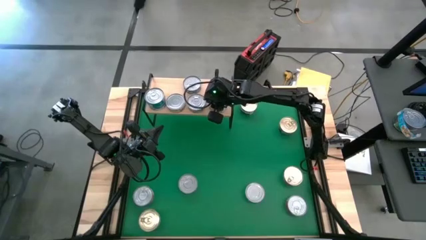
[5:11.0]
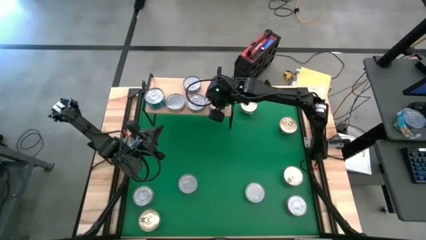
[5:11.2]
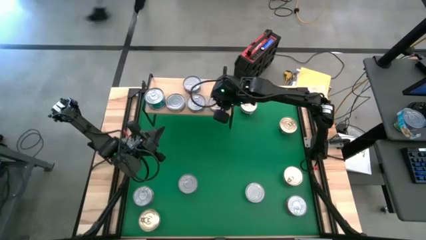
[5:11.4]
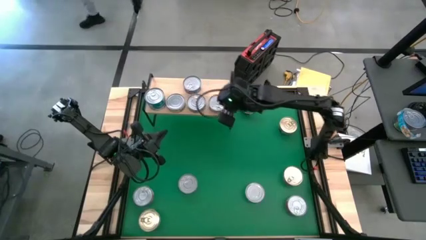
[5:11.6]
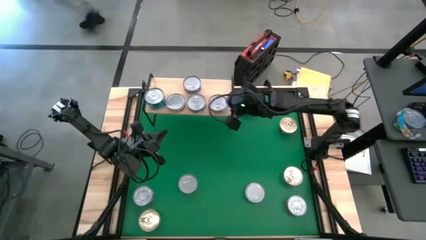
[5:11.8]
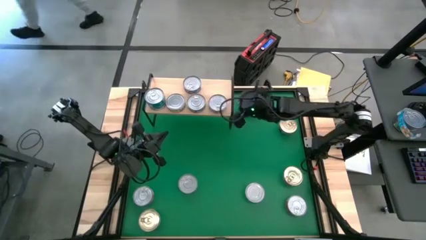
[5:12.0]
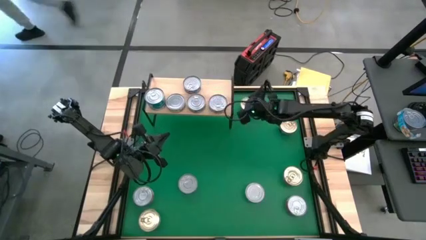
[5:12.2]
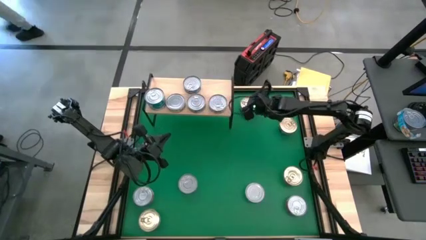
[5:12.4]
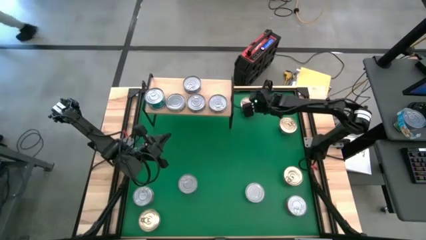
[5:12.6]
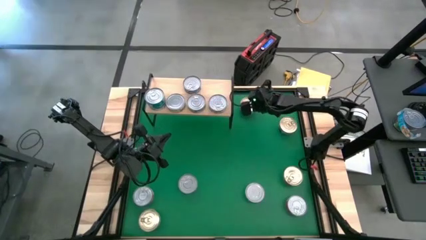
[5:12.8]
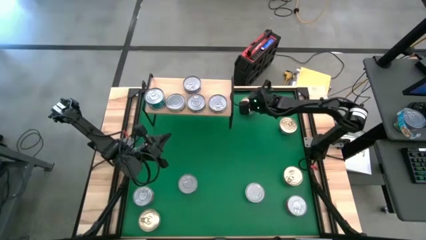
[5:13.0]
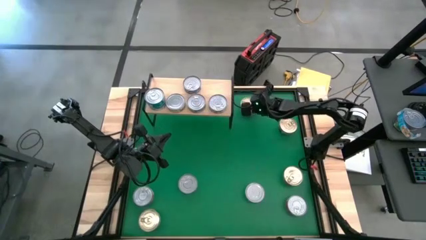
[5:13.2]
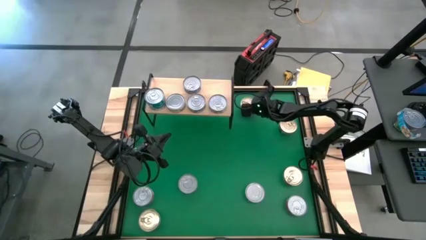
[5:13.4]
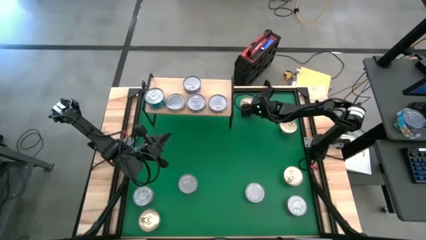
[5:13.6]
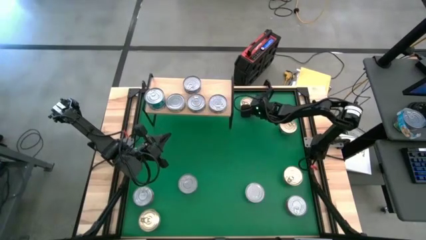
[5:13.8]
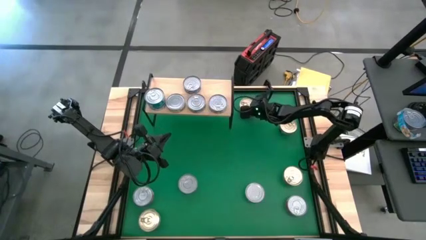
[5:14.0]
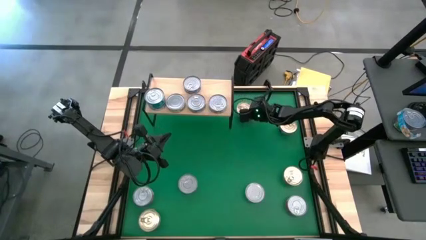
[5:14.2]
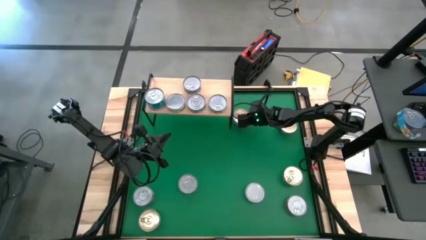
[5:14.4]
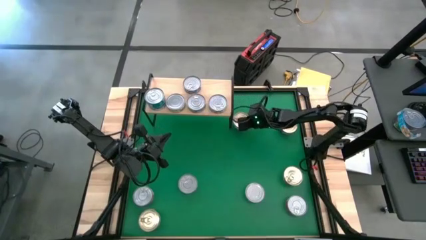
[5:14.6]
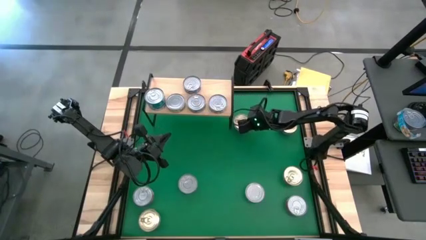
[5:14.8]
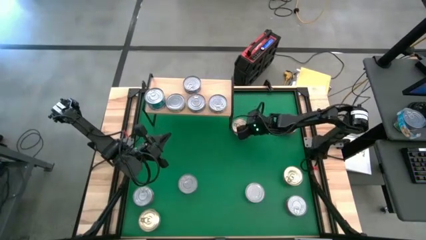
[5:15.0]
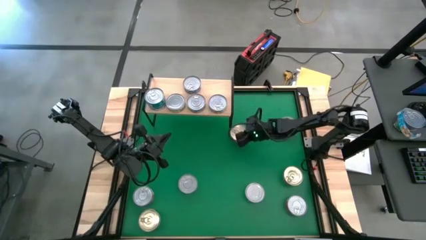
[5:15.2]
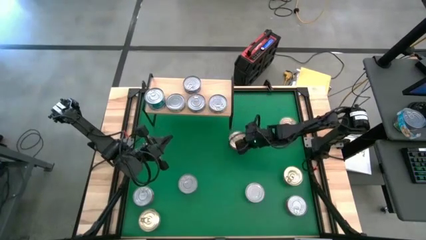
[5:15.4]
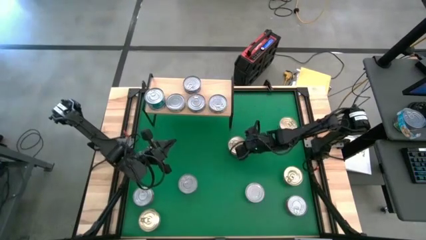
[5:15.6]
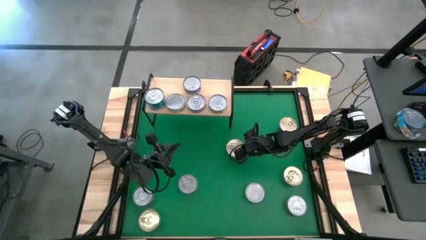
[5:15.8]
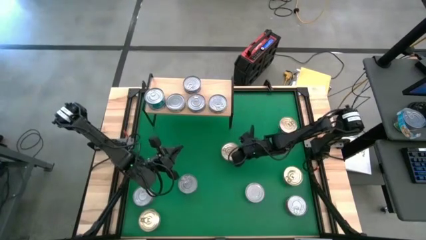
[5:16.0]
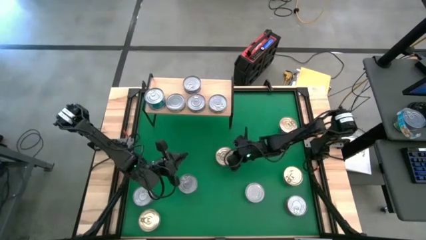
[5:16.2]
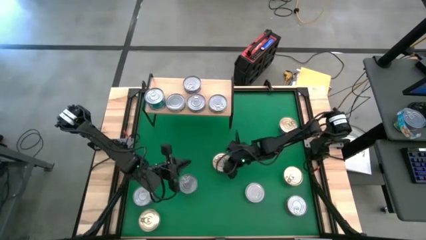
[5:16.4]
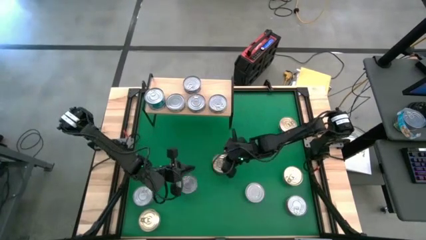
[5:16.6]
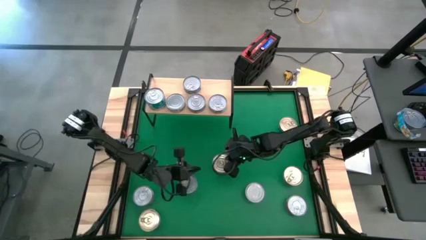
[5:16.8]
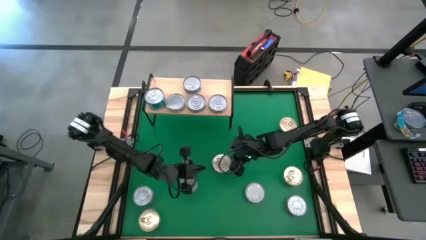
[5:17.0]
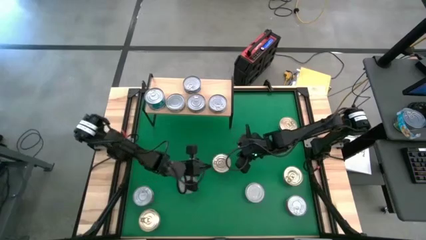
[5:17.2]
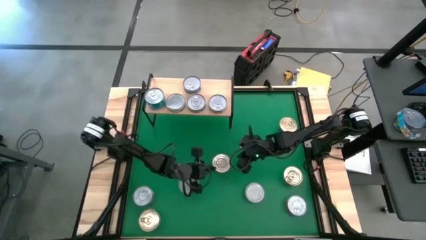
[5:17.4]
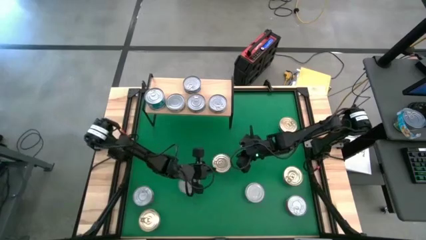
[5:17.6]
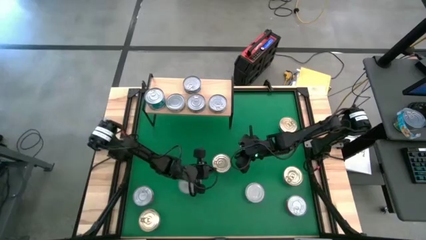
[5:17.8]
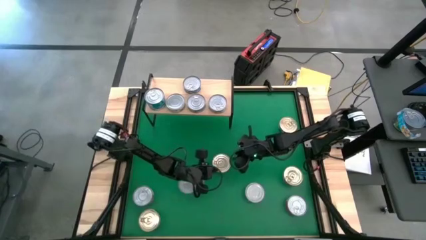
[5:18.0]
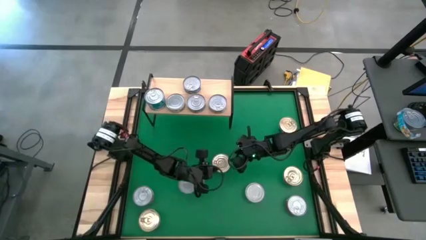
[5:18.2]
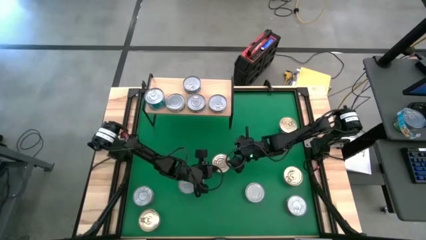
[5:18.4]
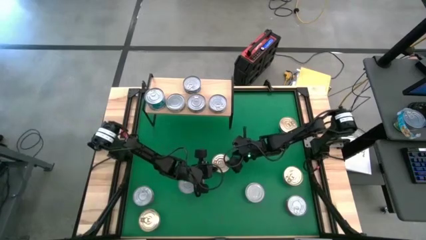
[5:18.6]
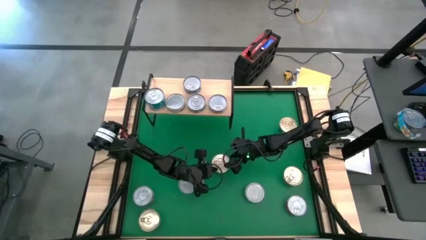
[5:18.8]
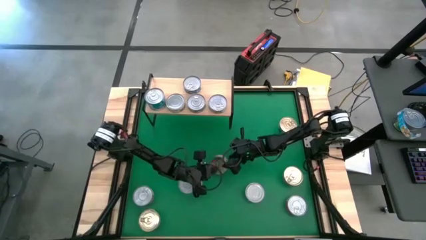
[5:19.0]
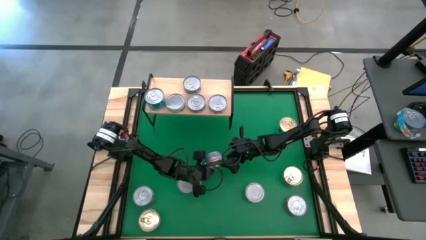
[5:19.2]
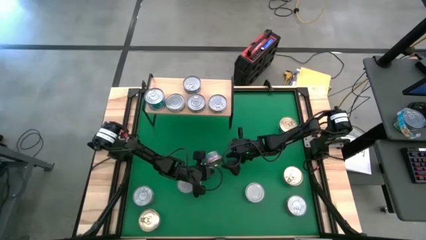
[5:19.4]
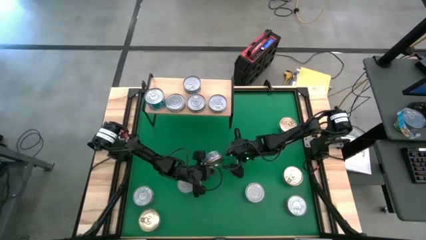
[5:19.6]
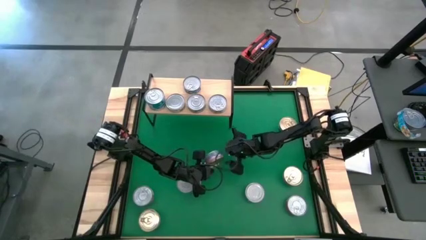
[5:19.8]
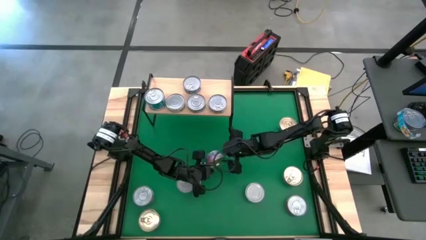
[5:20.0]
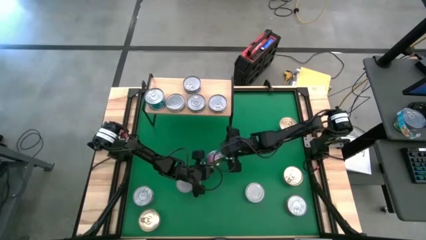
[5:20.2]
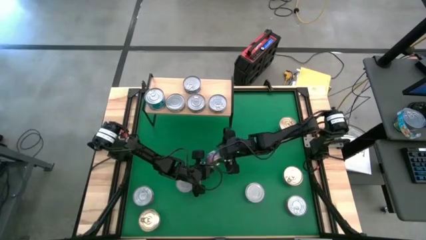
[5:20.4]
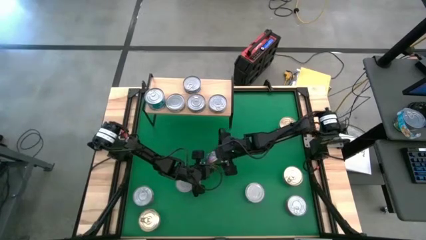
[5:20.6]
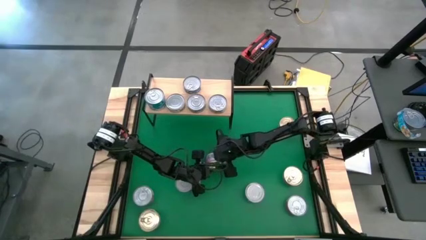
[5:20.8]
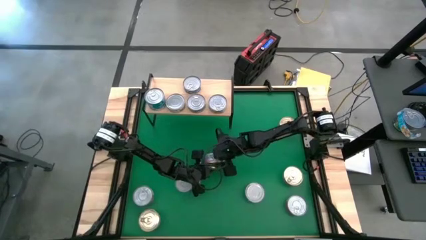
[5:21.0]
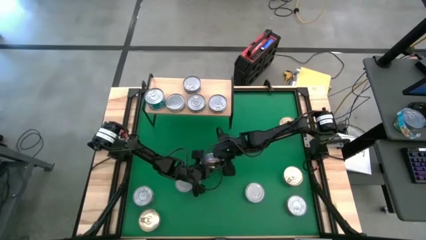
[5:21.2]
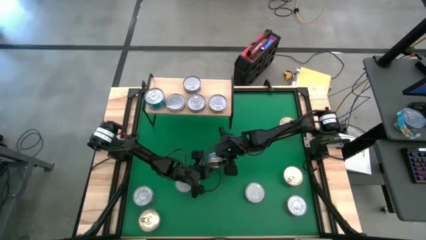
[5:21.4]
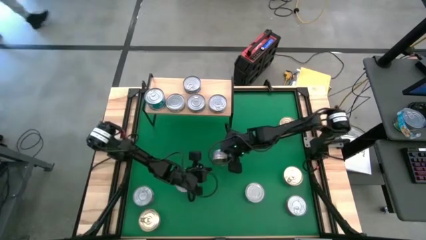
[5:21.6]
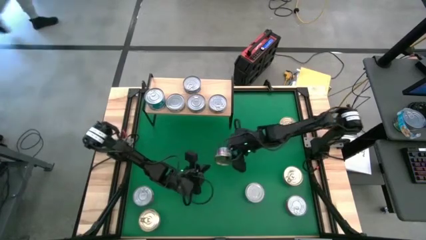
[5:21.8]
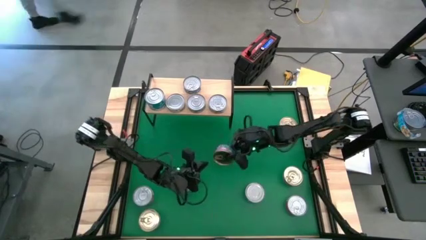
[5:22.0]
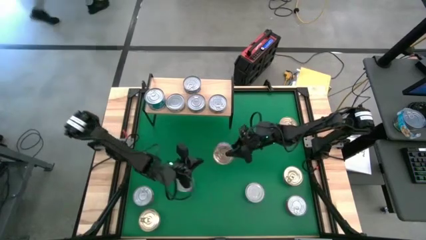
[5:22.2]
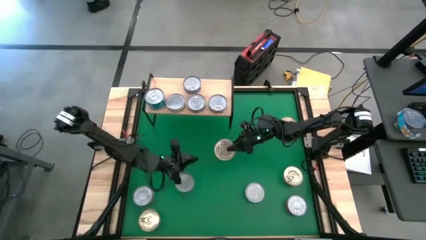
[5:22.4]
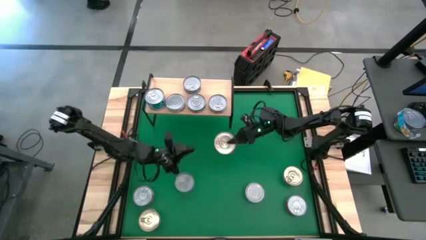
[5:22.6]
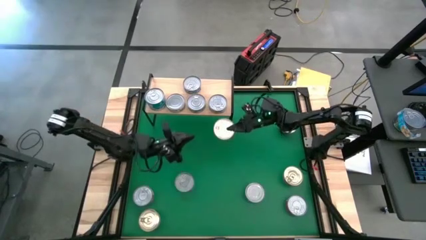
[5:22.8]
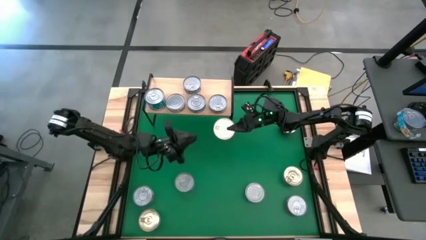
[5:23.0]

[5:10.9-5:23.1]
Task: Stack canned seafood by type on shelf
Put the top right blue tuna can on the shelf
